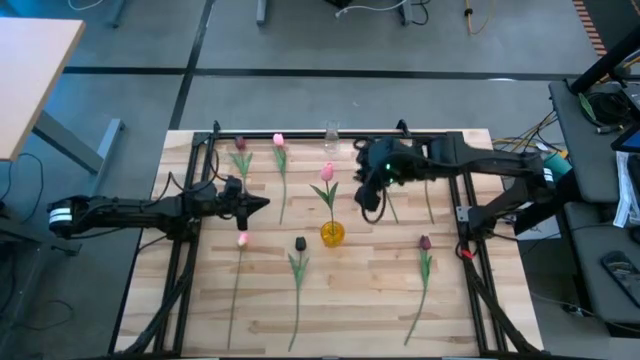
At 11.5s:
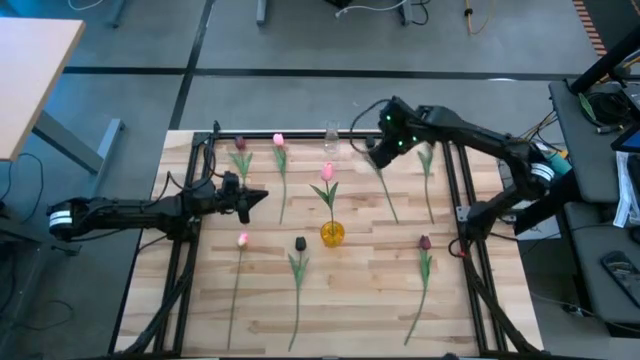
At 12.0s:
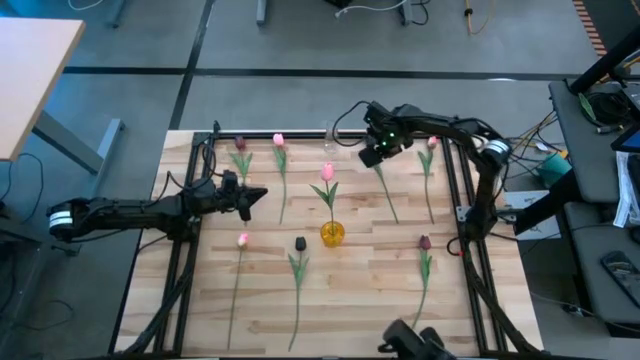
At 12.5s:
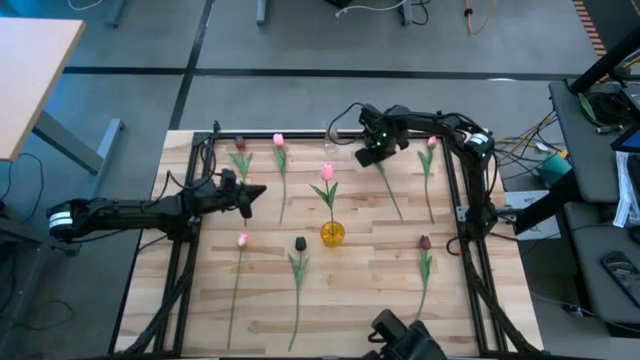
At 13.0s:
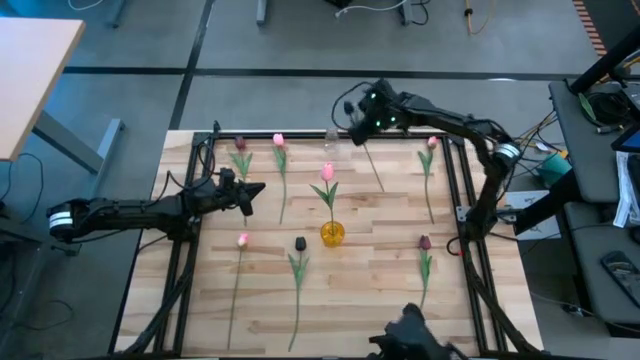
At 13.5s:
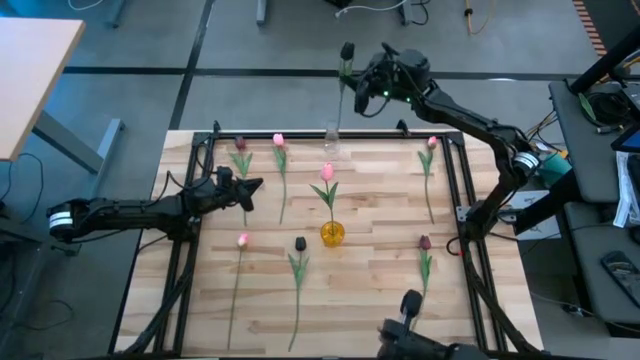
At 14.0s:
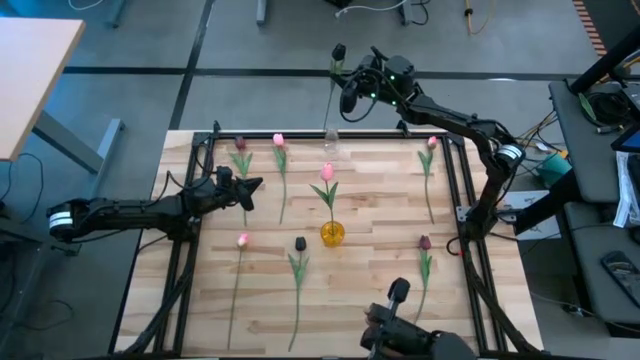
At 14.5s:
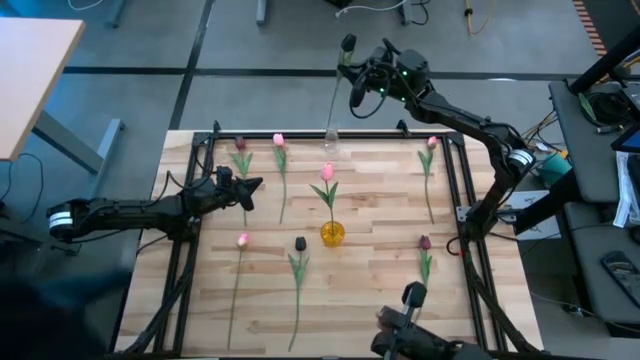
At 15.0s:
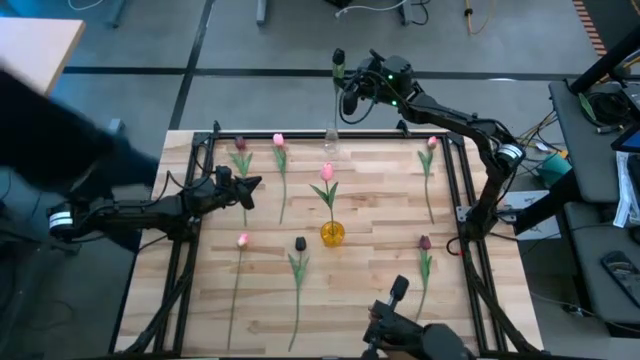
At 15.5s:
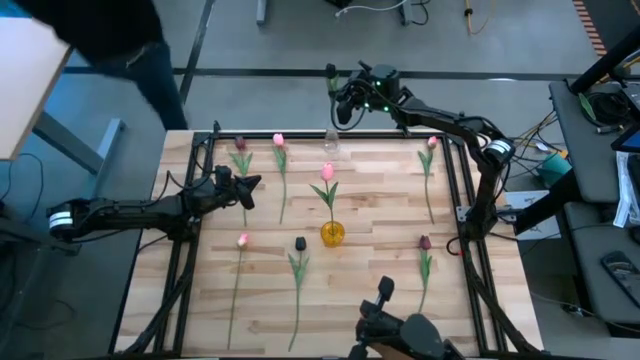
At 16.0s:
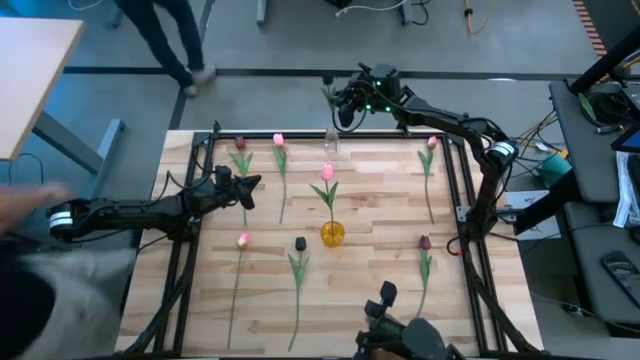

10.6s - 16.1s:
Task: Sort flowers into vase by color
Put the black tulip into the transparent vase

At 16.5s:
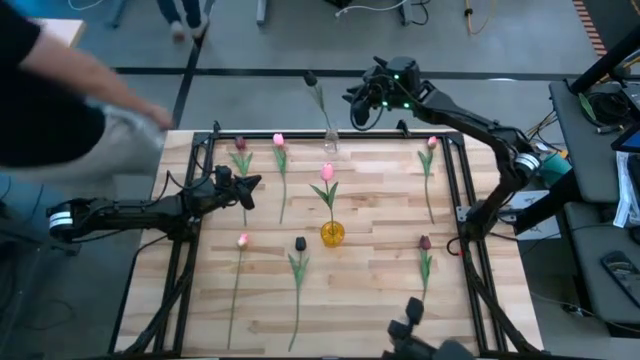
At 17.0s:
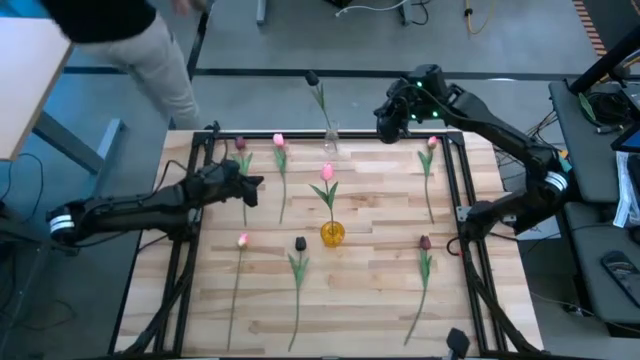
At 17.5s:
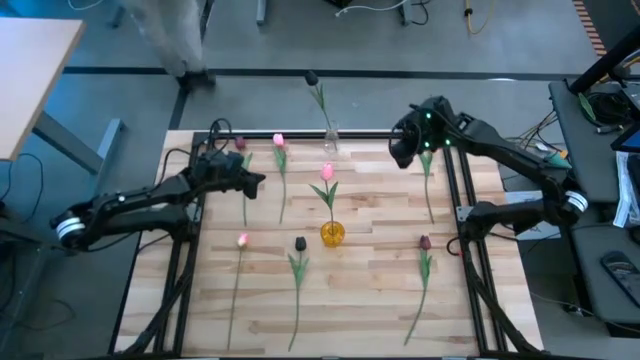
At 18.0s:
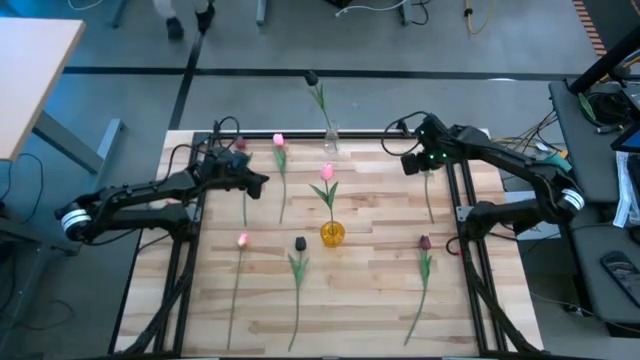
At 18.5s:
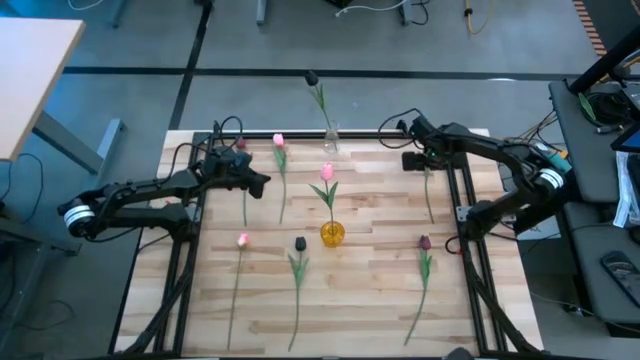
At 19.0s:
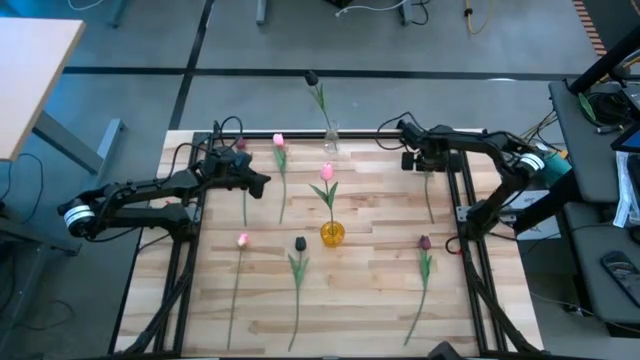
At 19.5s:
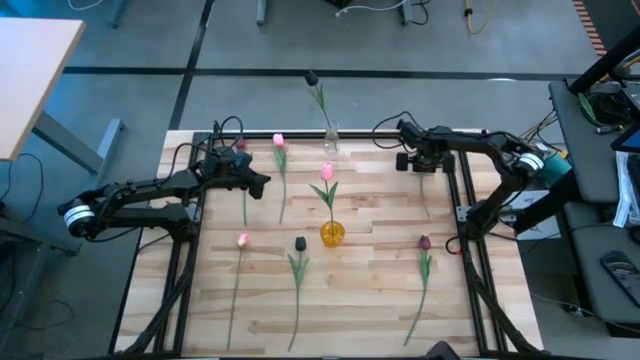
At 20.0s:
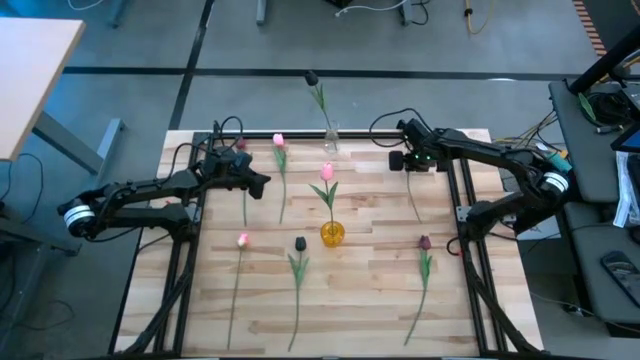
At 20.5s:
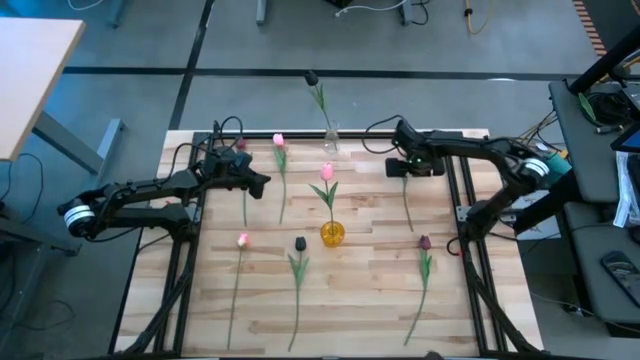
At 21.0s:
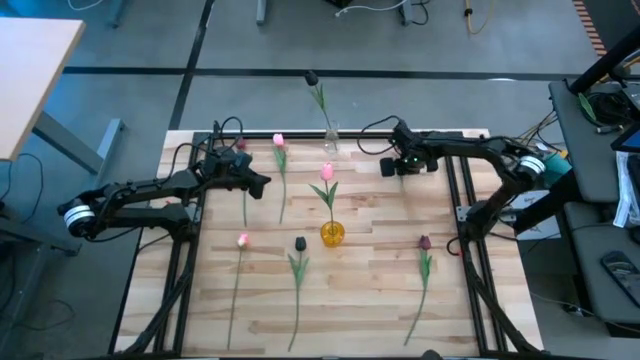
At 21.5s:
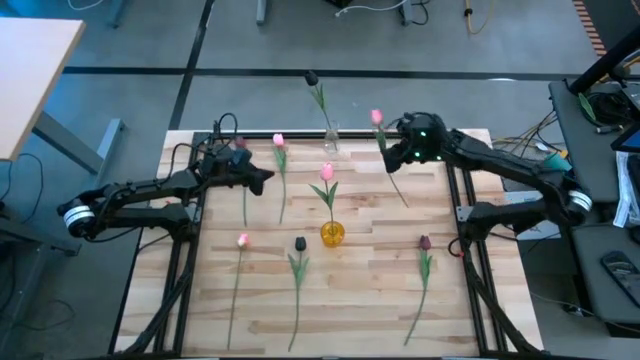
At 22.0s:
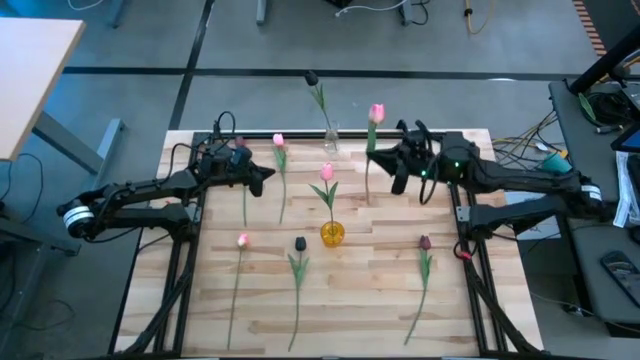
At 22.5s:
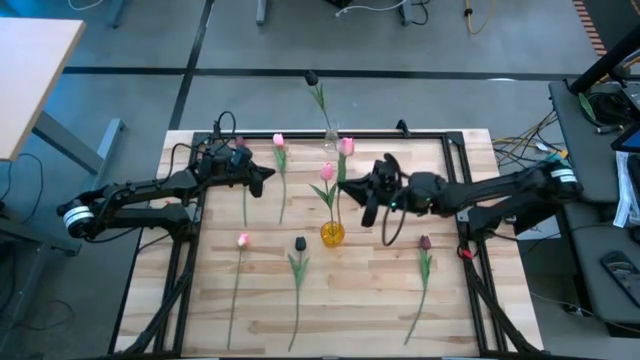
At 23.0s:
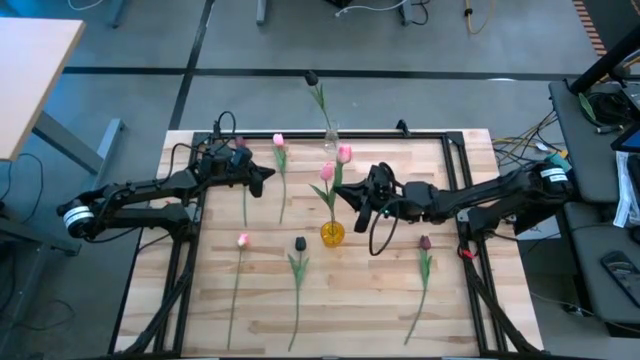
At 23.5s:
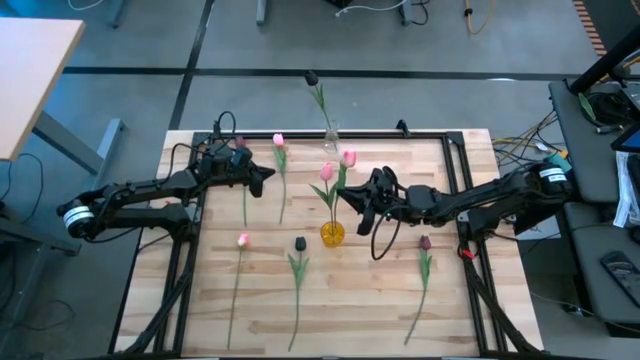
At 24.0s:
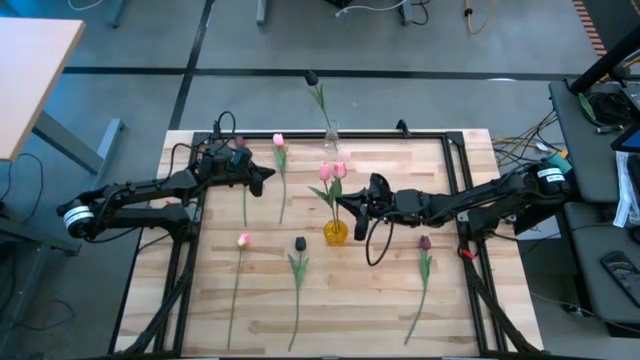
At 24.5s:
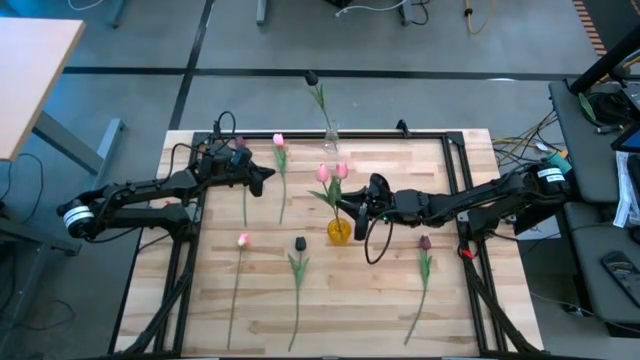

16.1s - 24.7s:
Put the pink tulip into the yellow vase

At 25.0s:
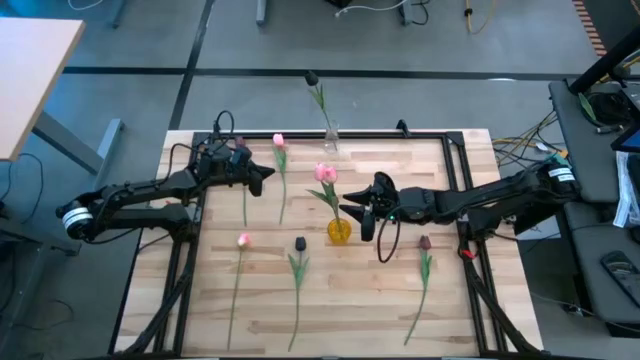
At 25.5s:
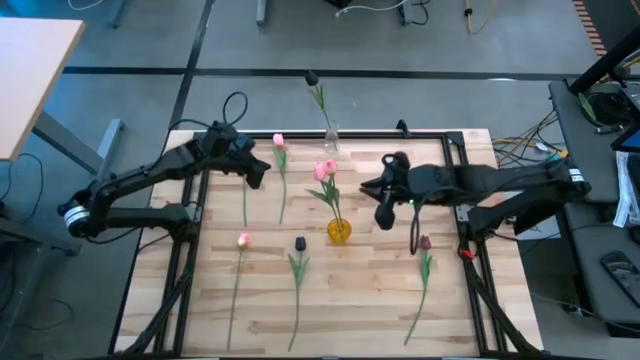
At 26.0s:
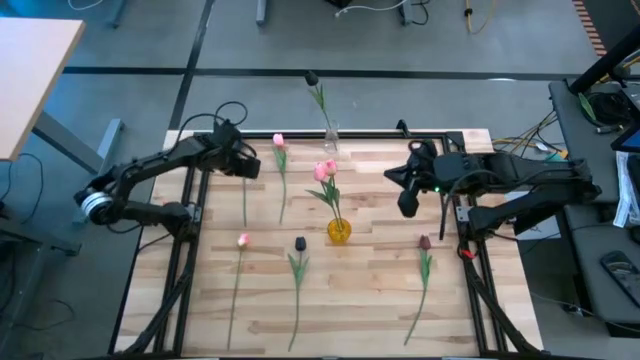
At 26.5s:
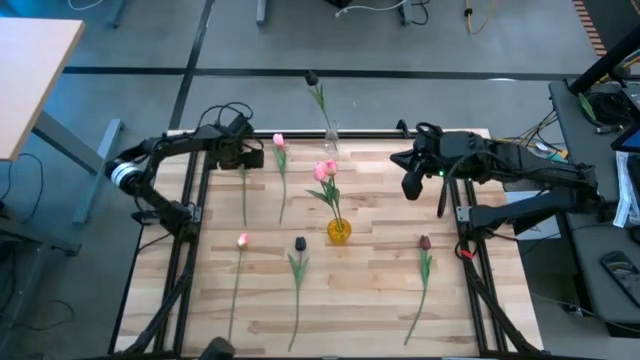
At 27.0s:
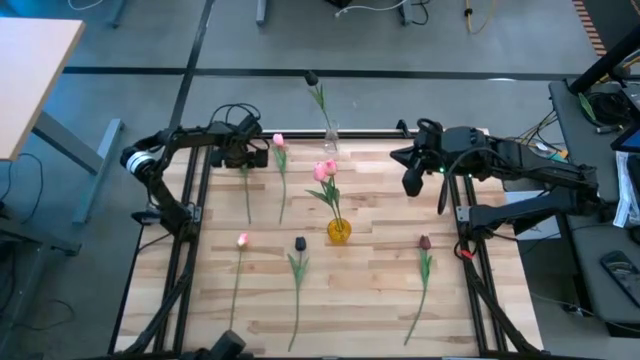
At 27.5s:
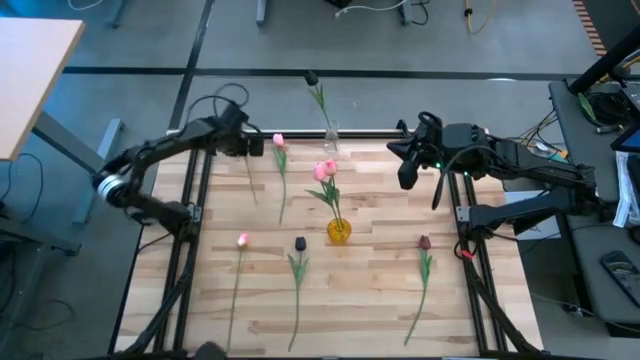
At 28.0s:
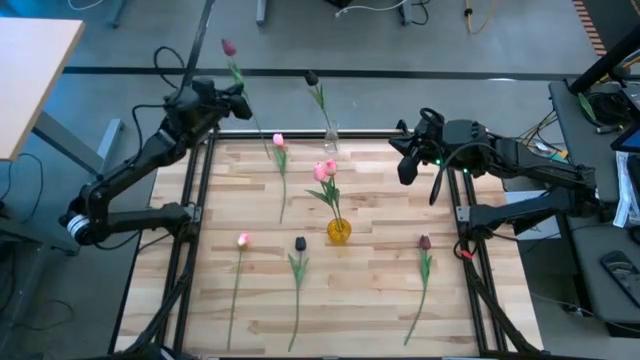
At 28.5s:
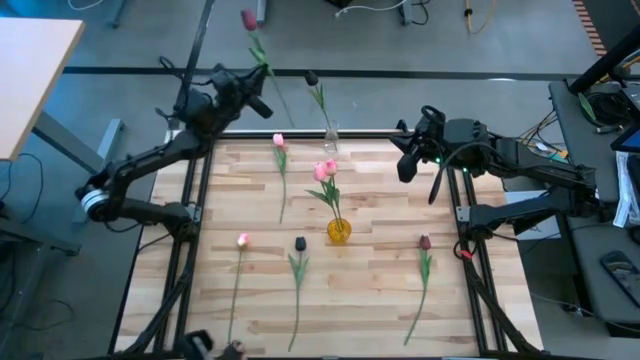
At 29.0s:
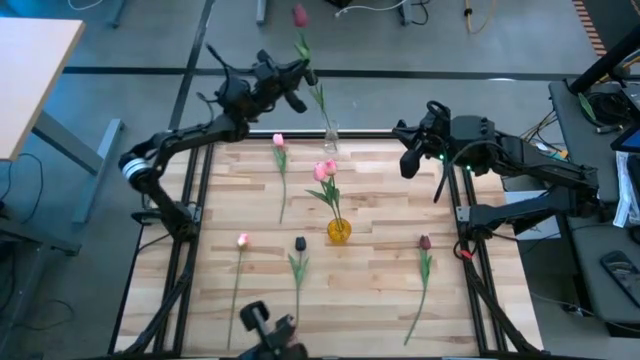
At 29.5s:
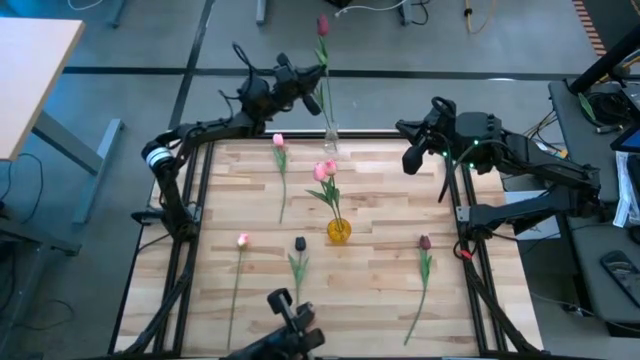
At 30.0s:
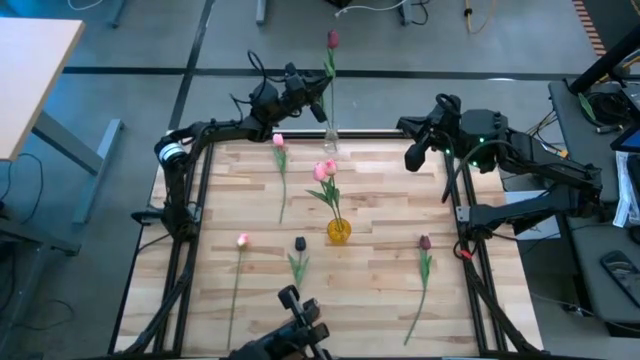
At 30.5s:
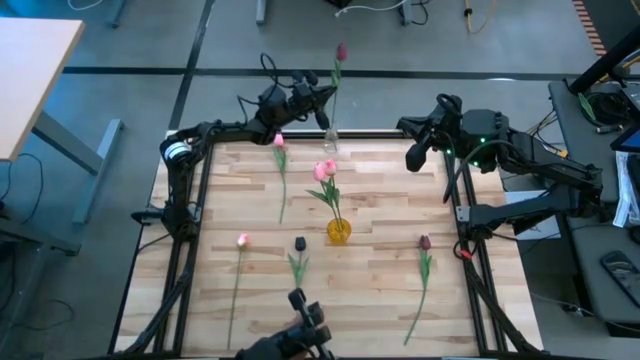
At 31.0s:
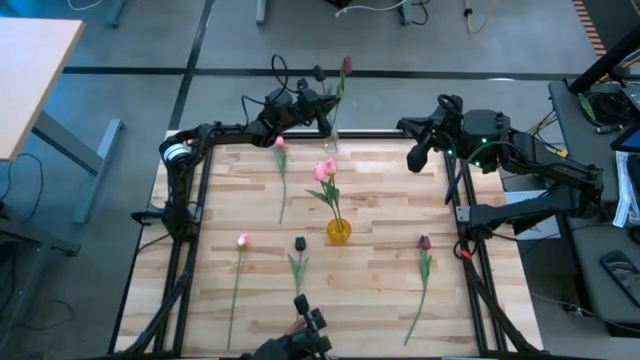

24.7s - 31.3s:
Put the red tulip into the transparent vase

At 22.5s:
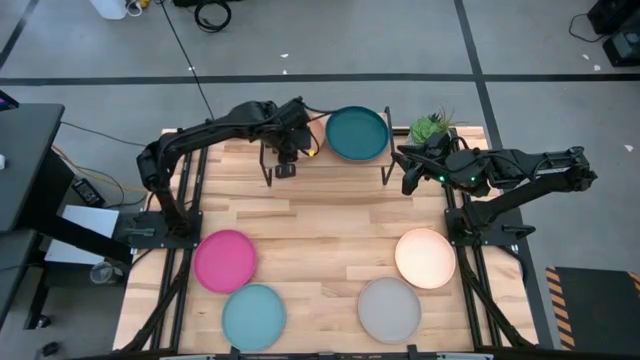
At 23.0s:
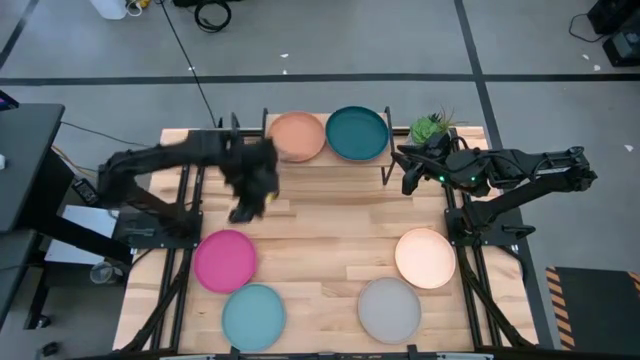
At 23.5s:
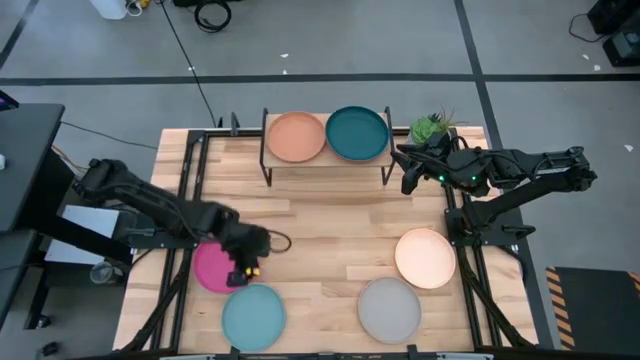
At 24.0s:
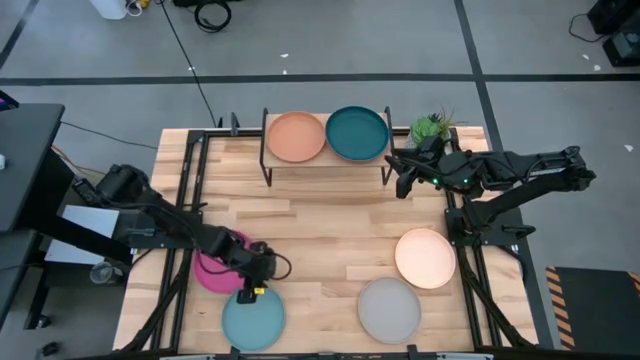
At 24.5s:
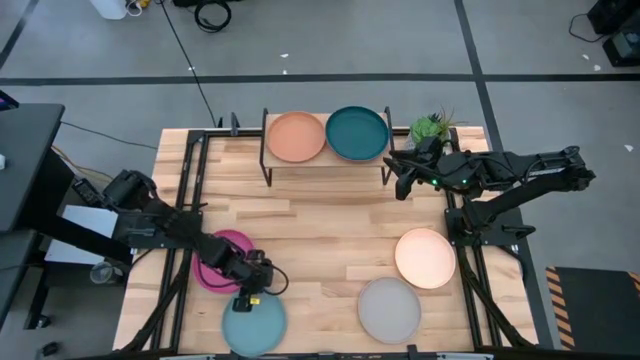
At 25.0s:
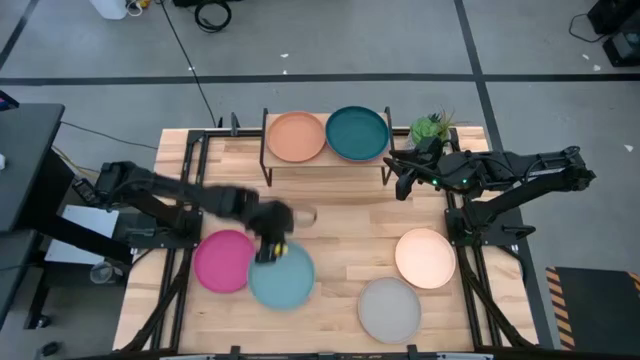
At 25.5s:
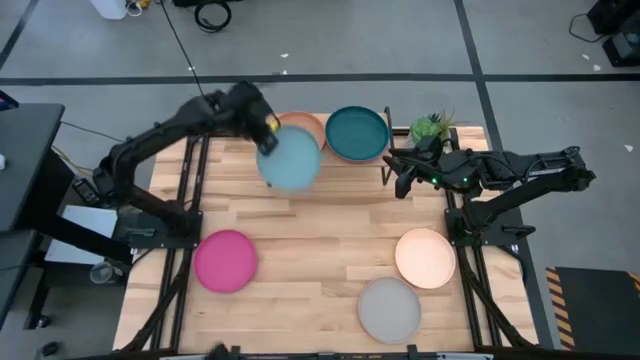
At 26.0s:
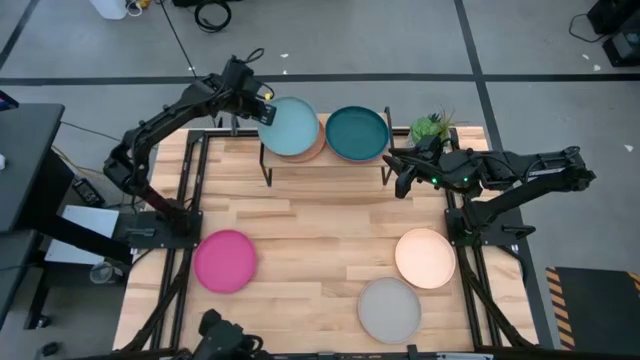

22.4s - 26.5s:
Task: Place and stack plates onto a shelf
Stack the light blue plate on top of the brown plate on the shelf
